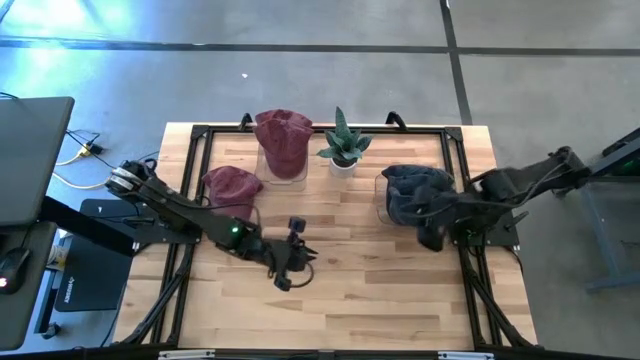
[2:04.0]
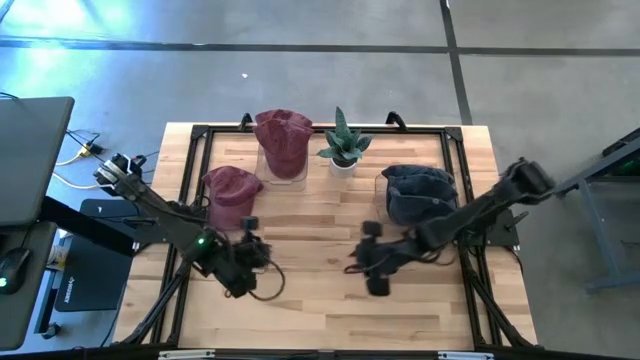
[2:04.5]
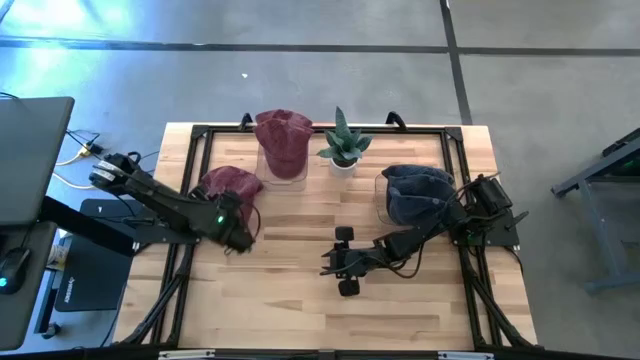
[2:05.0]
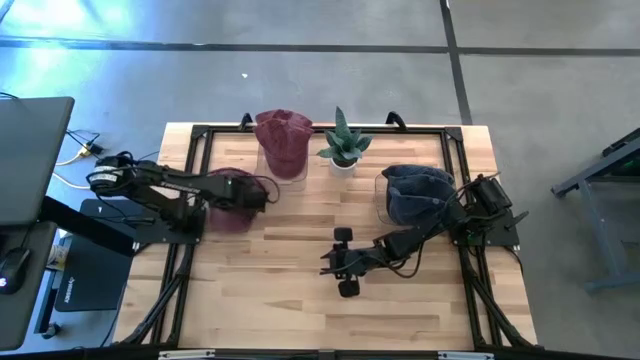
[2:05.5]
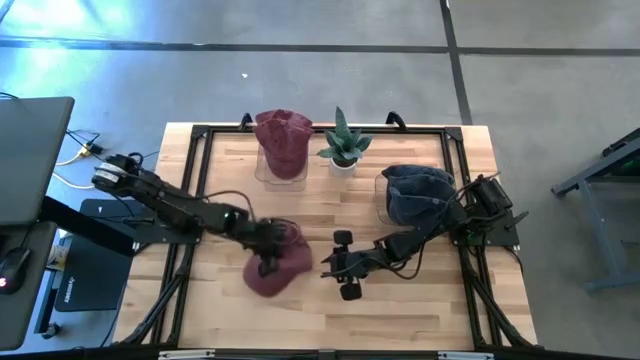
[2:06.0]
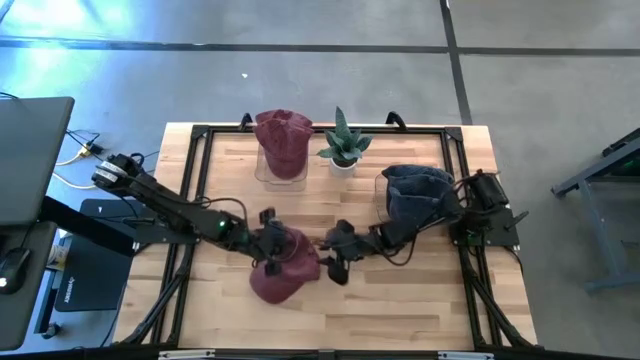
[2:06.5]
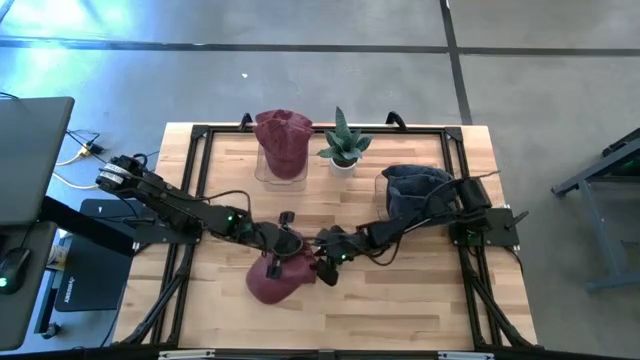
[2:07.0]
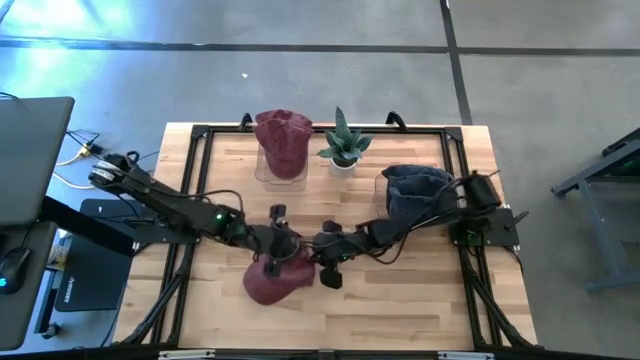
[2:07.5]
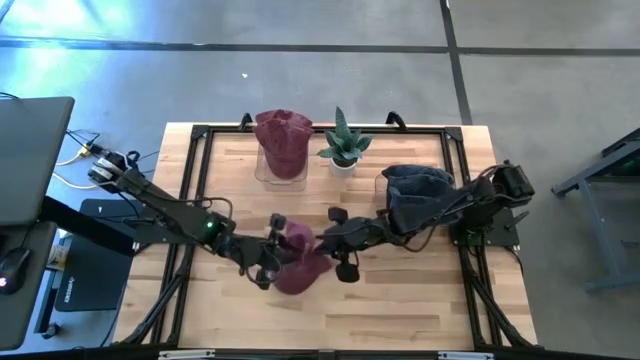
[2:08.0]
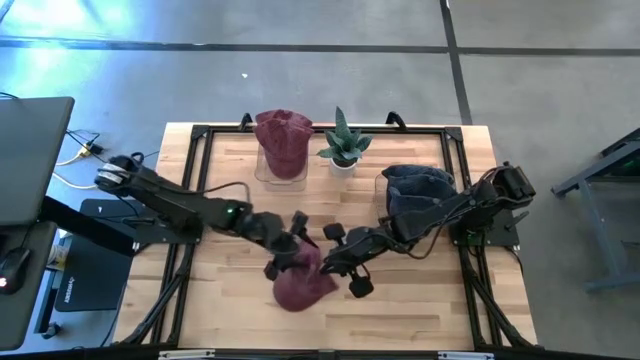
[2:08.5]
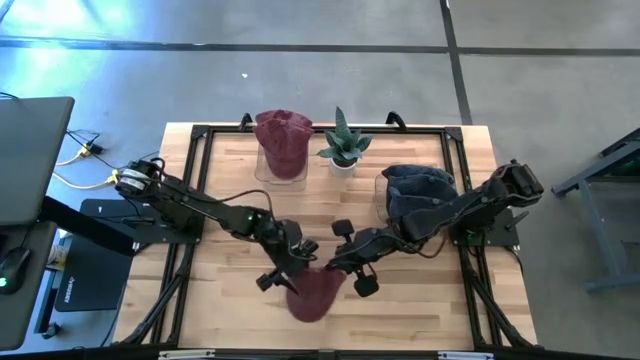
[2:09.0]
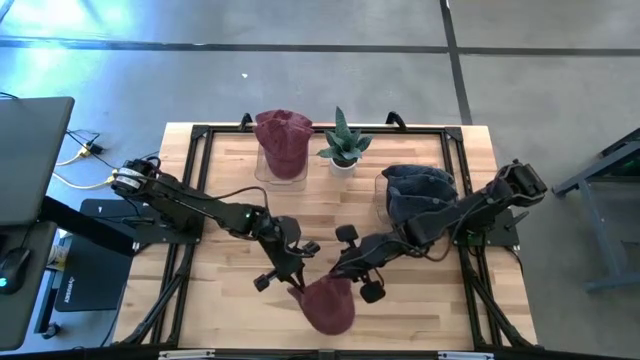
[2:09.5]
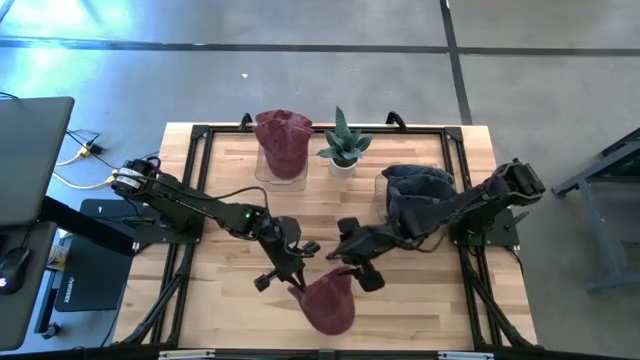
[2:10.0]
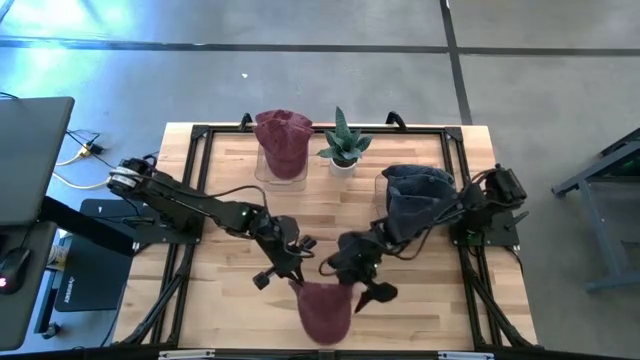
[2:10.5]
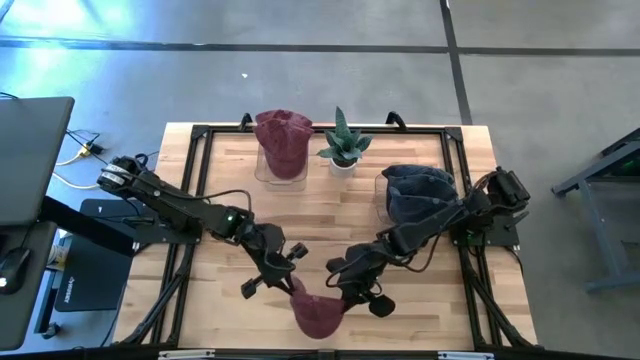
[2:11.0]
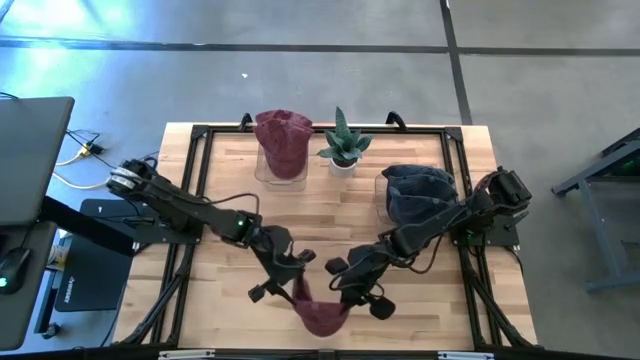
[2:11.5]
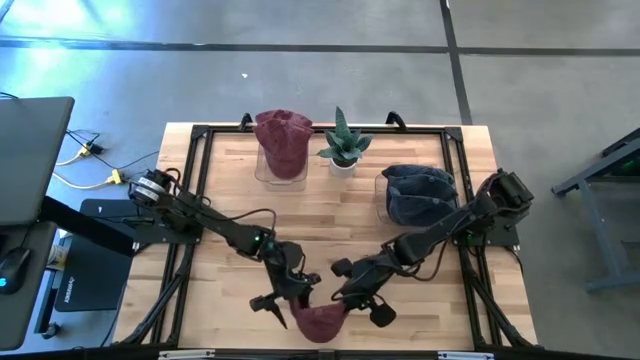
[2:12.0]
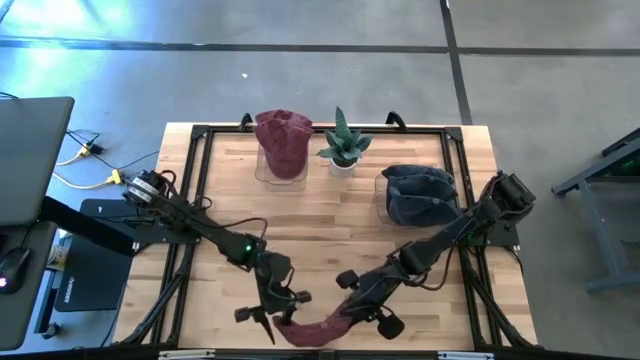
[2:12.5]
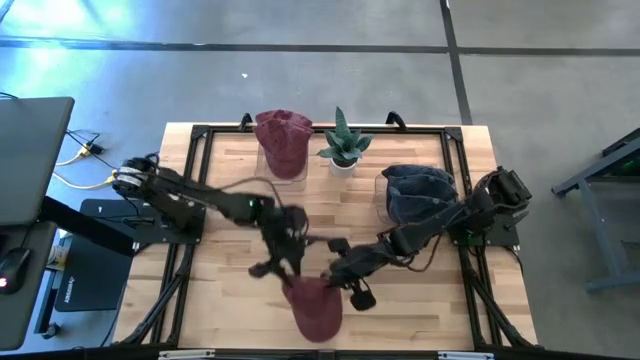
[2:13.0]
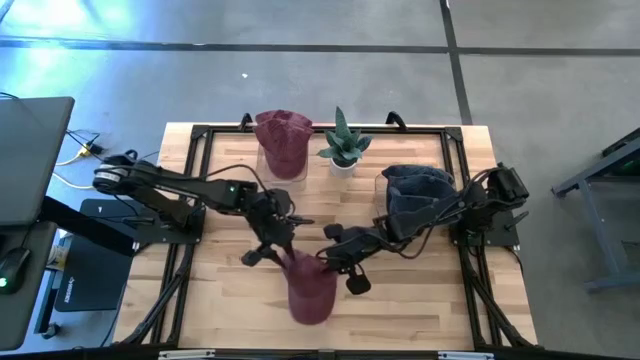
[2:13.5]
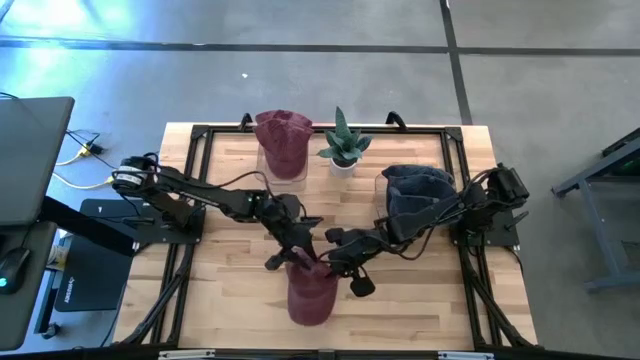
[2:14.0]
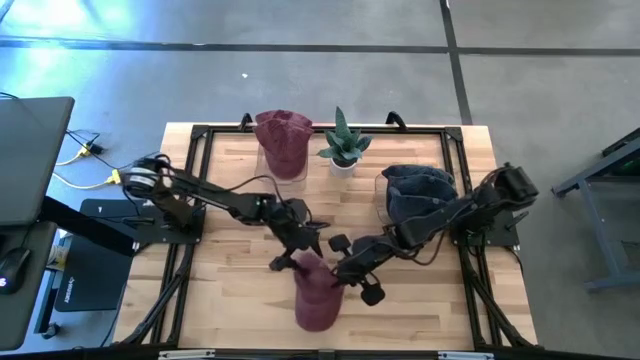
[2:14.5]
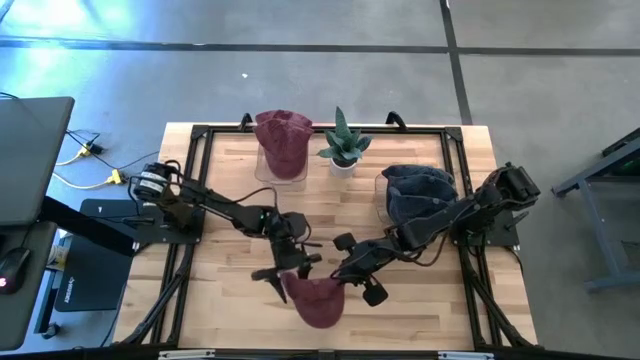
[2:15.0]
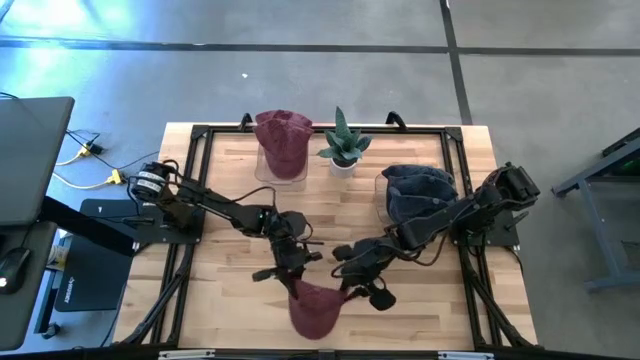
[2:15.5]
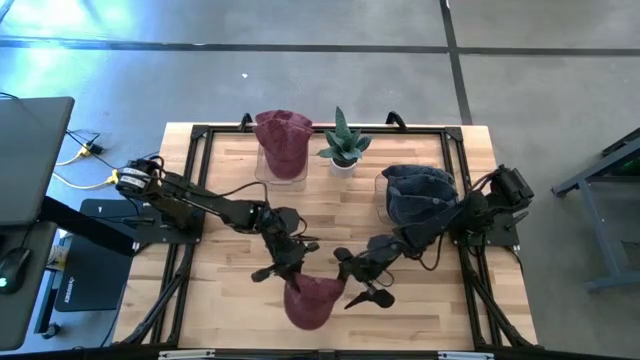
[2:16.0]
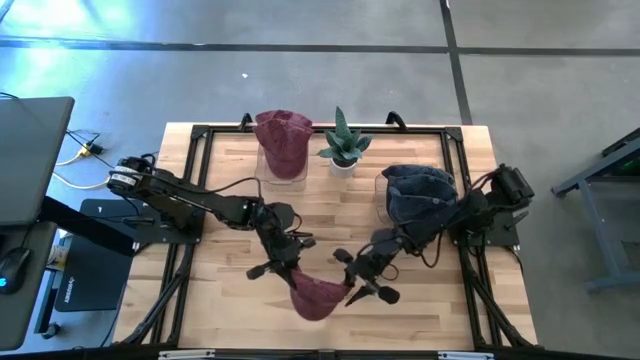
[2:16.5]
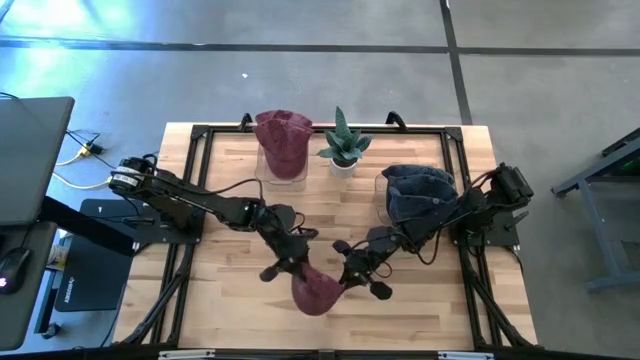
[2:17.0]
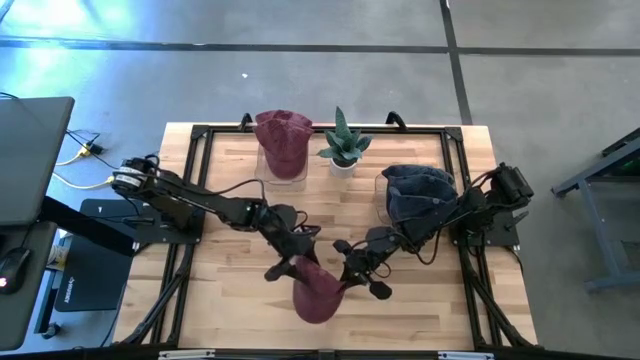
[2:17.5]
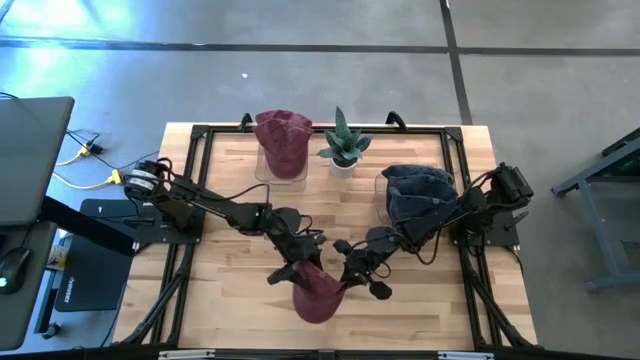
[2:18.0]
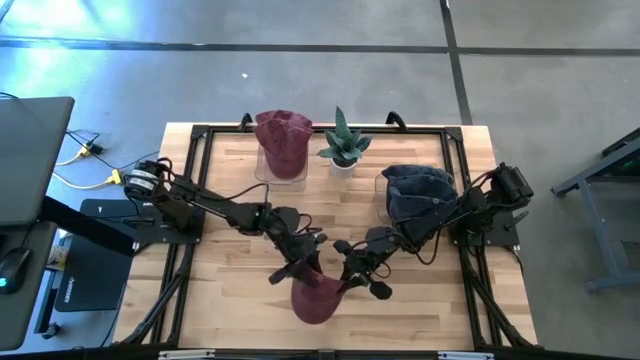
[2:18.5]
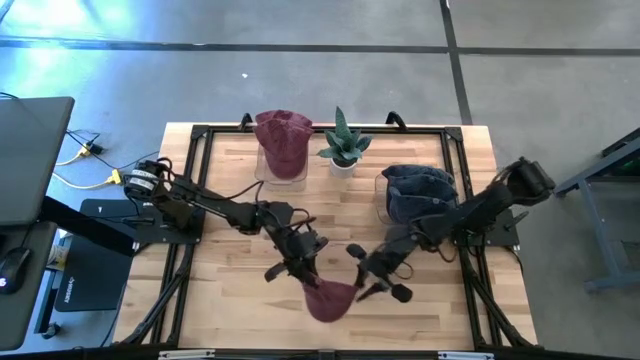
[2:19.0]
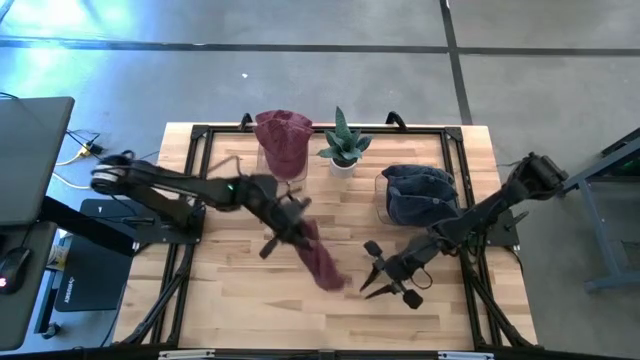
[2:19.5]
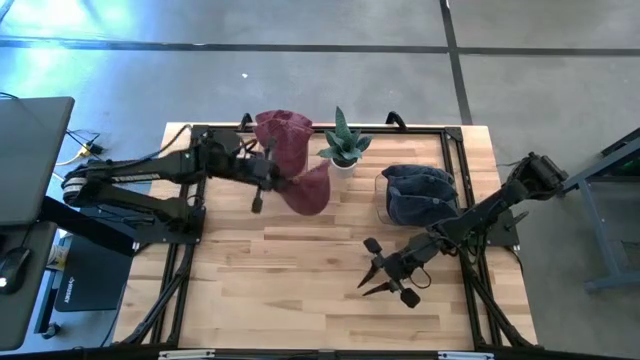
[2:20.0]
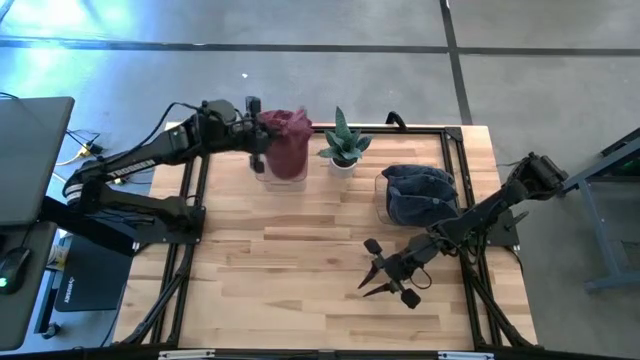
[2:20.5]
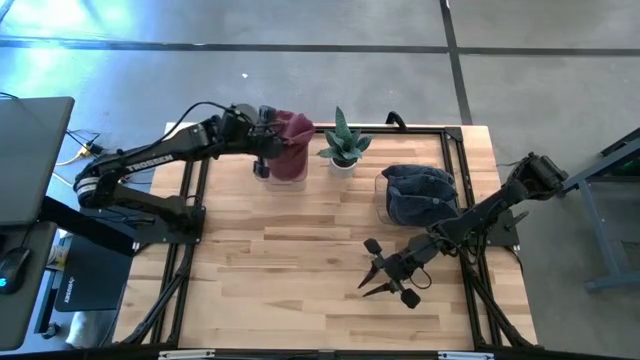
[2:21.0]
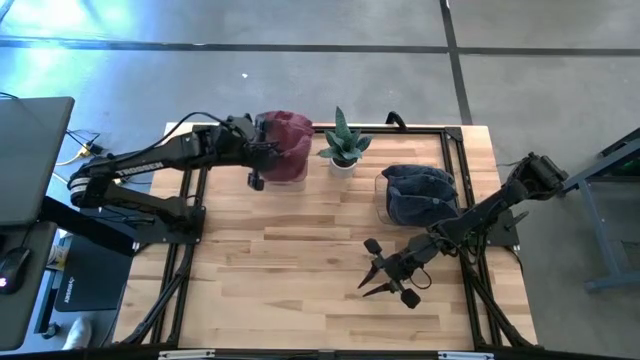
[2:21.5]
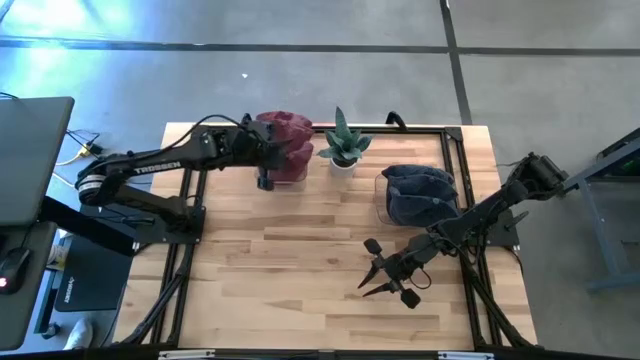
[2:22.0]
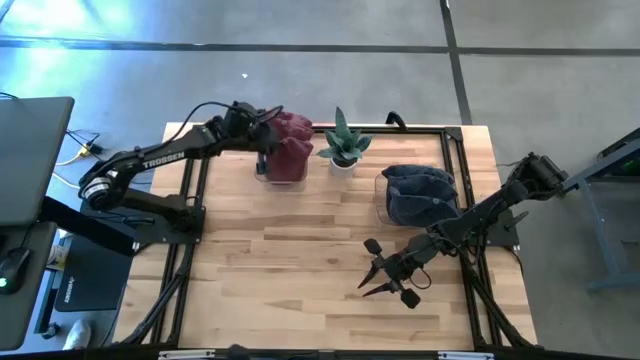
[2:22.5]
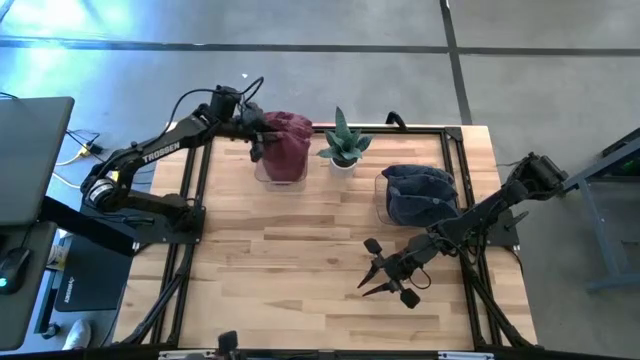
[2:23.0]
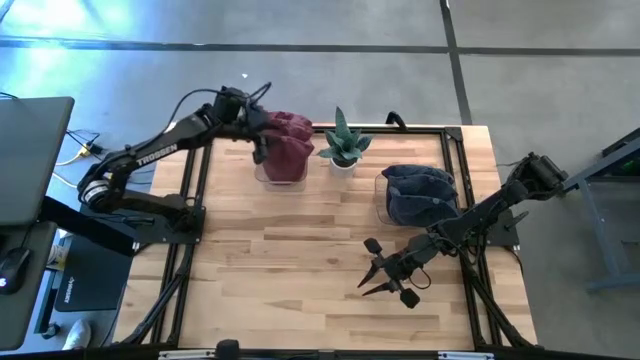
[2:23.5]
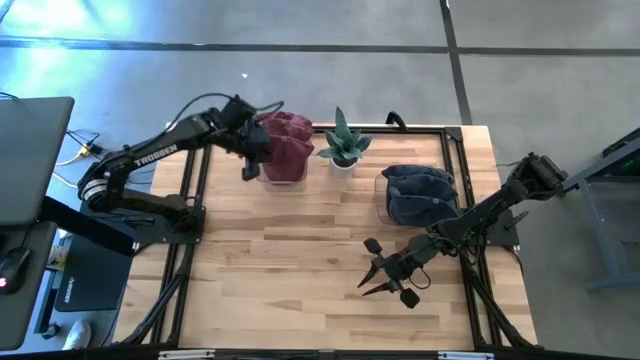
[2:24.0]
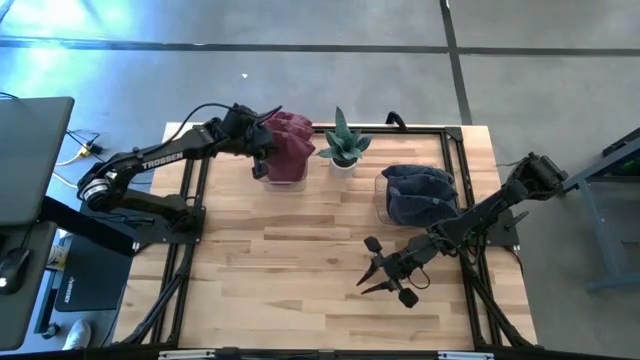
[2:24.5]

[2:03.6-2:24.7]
Task: Pick & Place hat
Put the red cap into the left transparent bin
